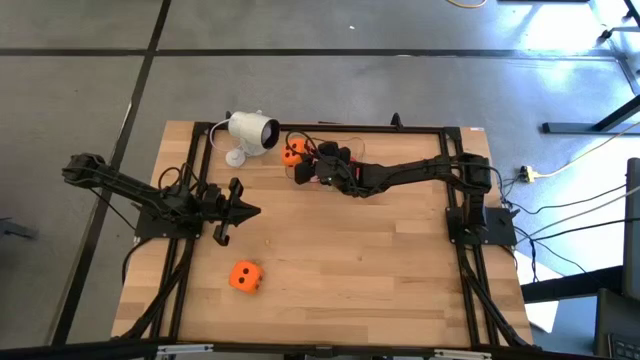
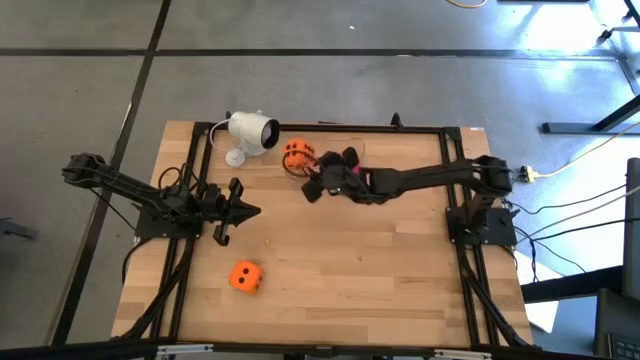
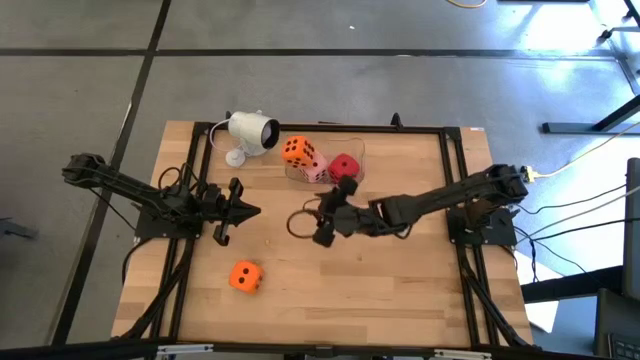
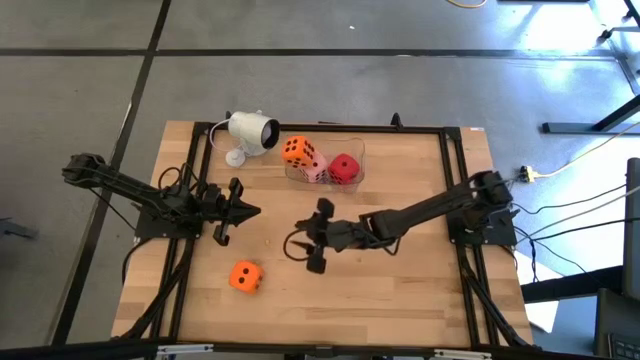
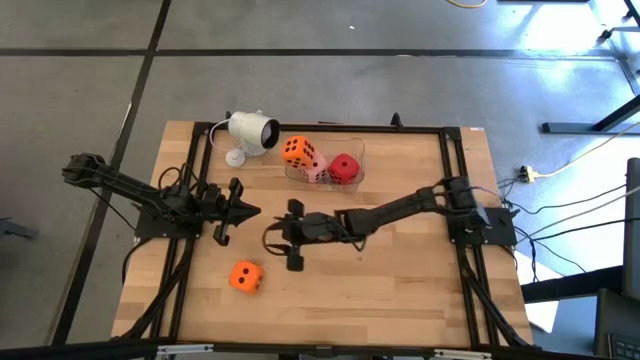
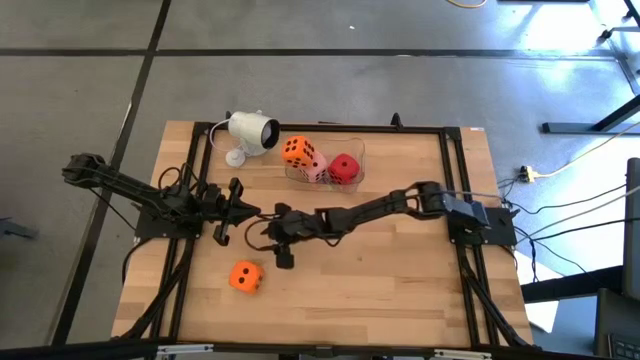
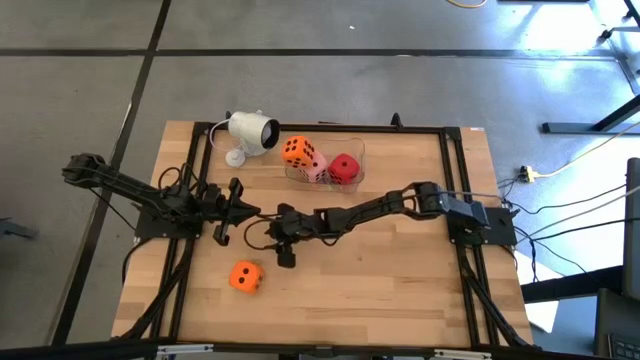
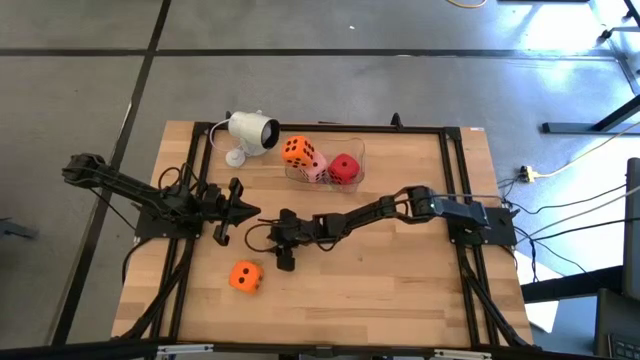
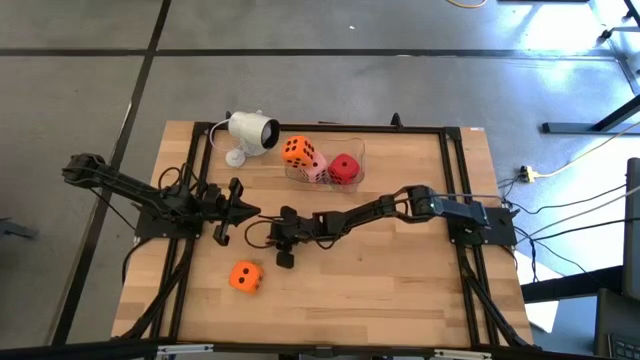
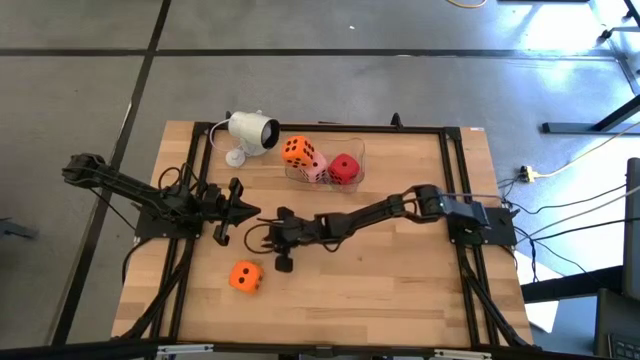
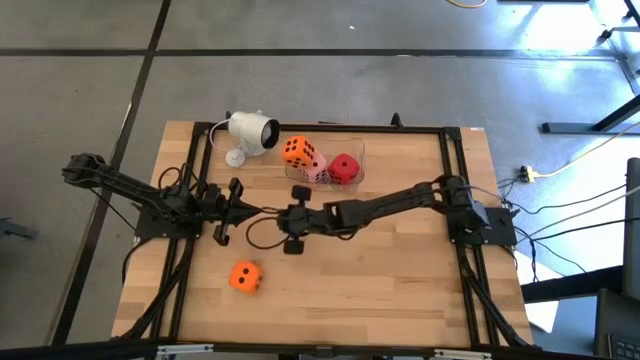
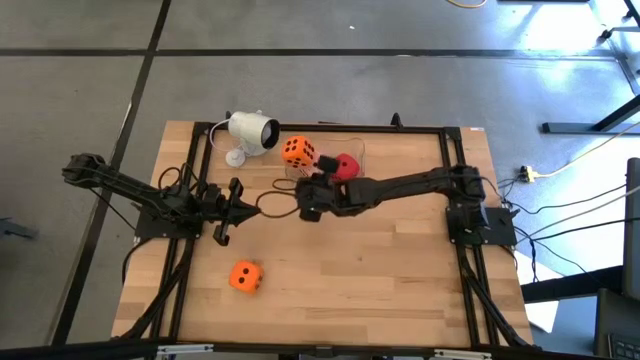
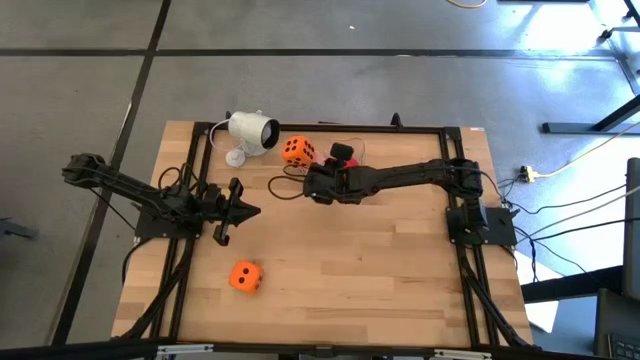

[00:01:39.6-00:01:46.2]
Task: Pick & Place Dice
Put the small yellow die into the transparent bin

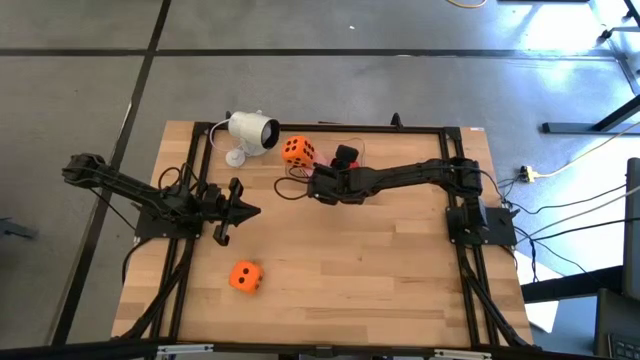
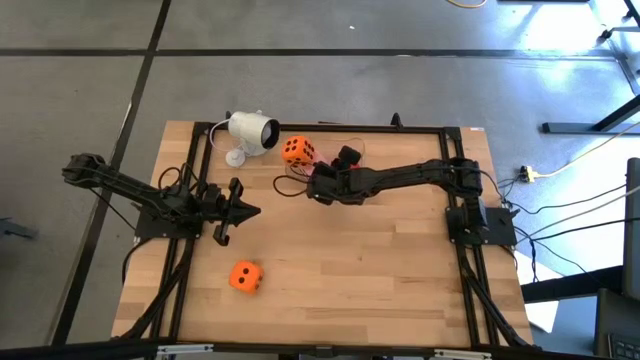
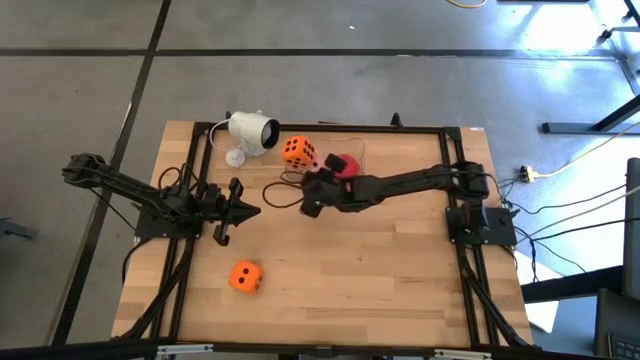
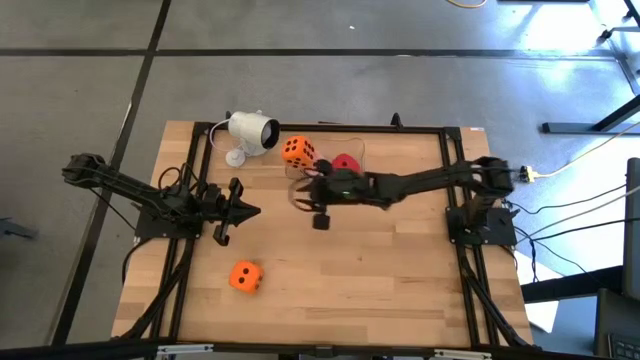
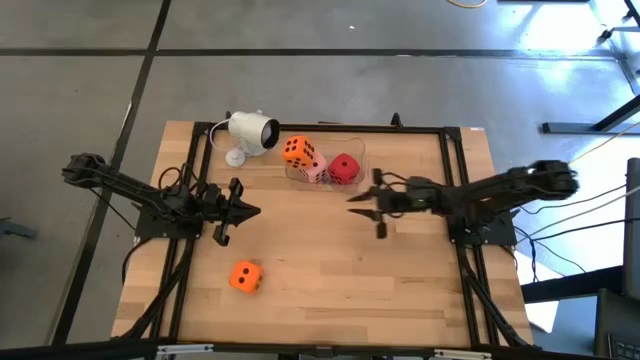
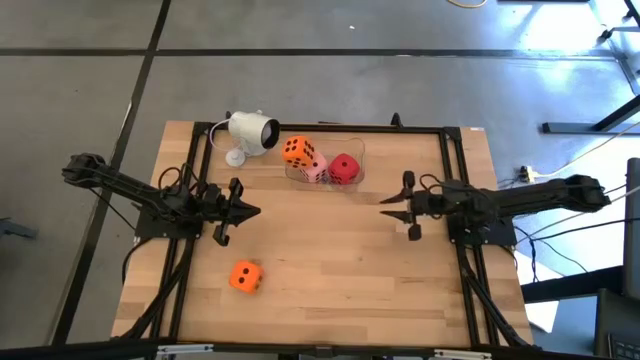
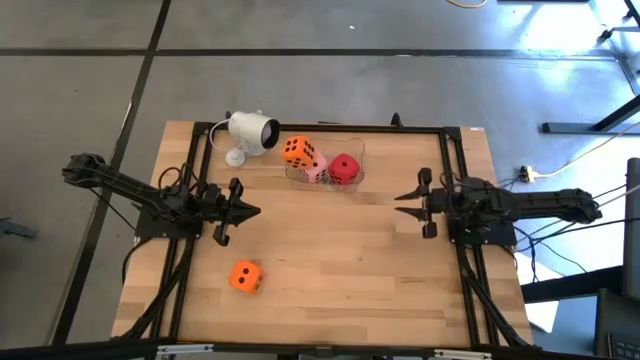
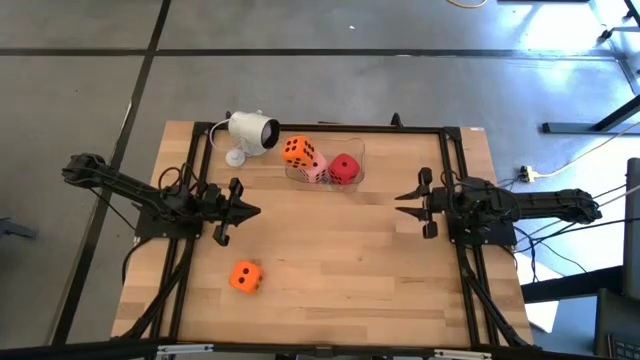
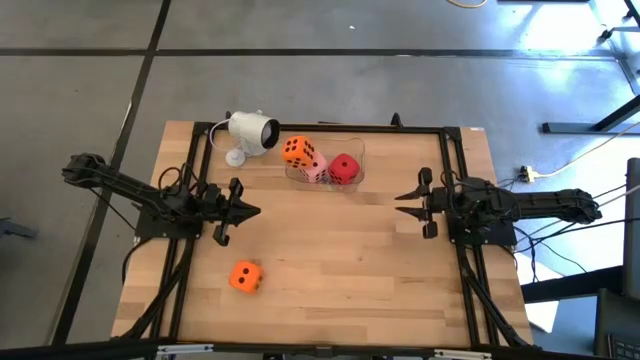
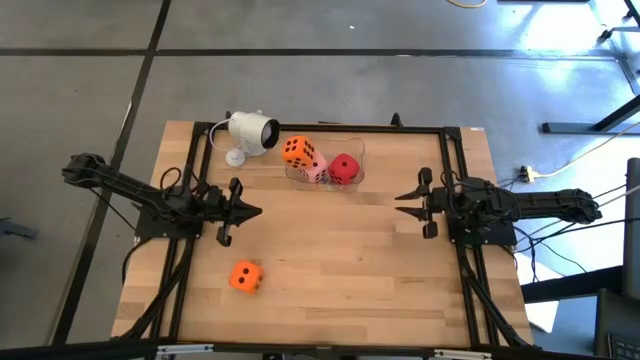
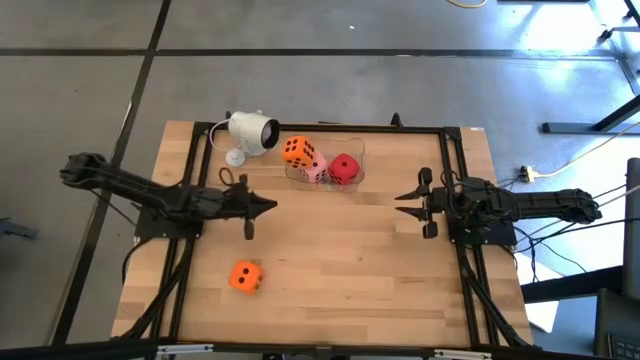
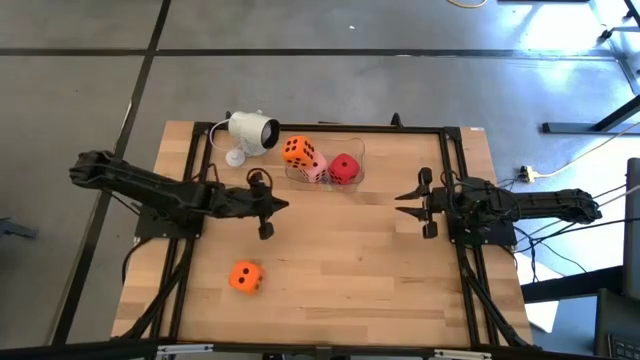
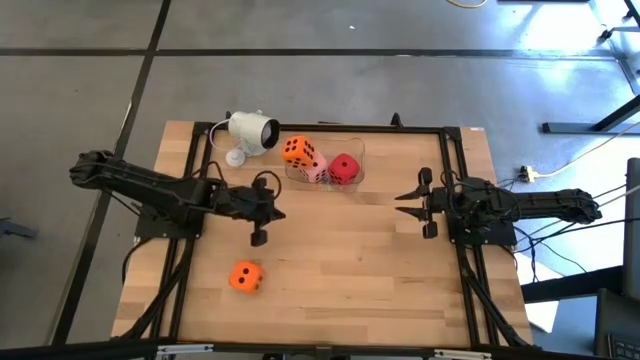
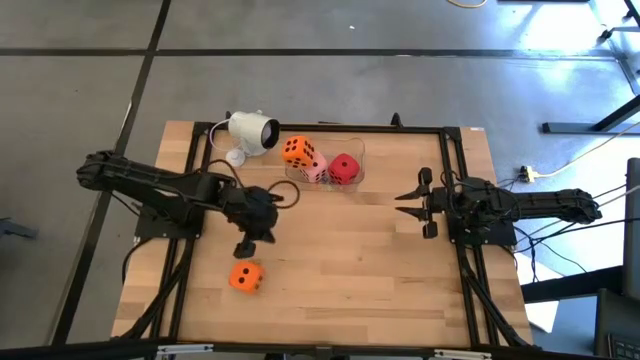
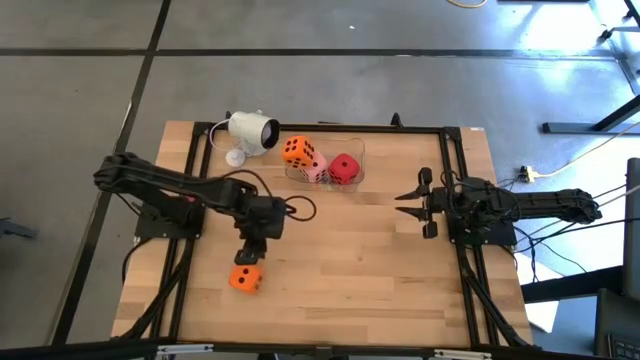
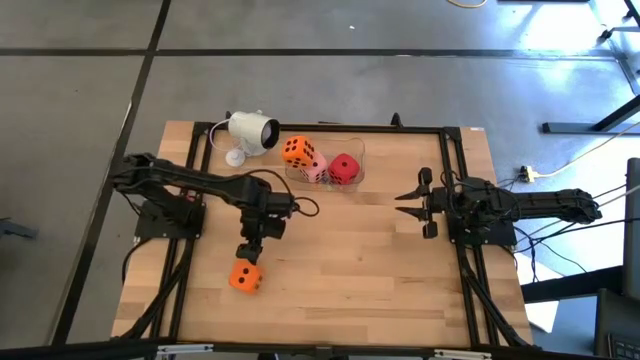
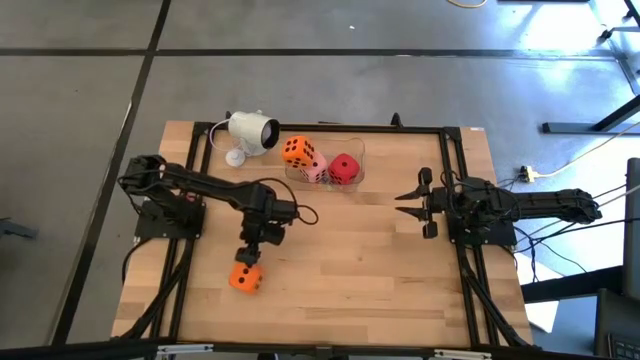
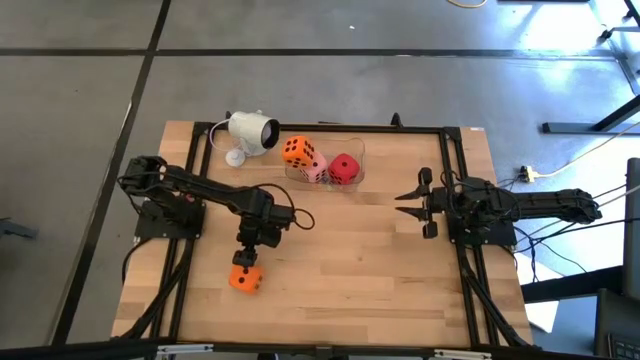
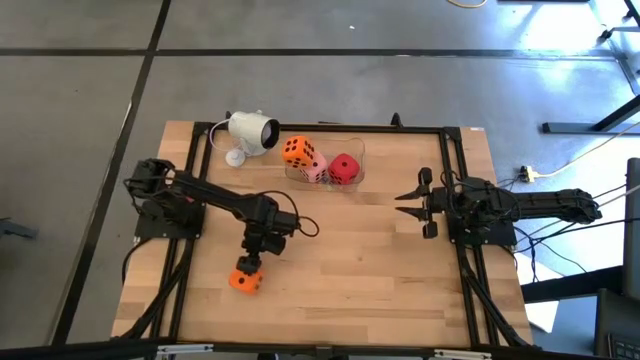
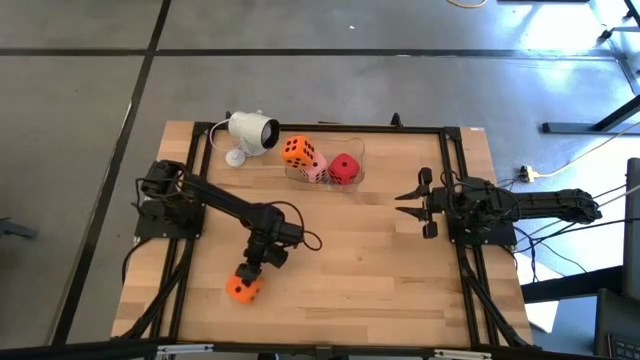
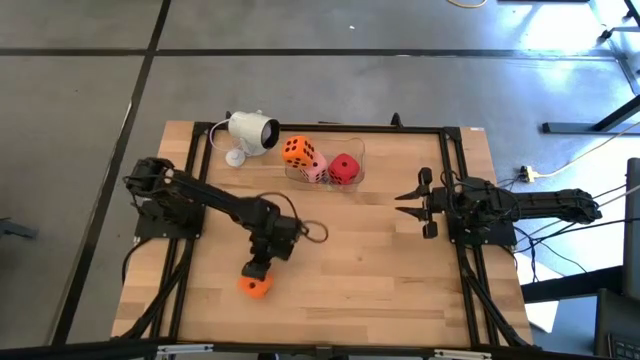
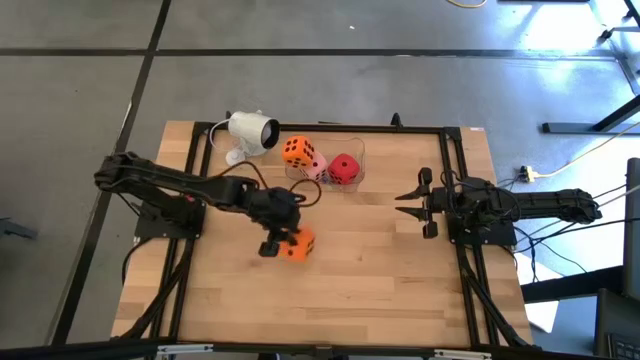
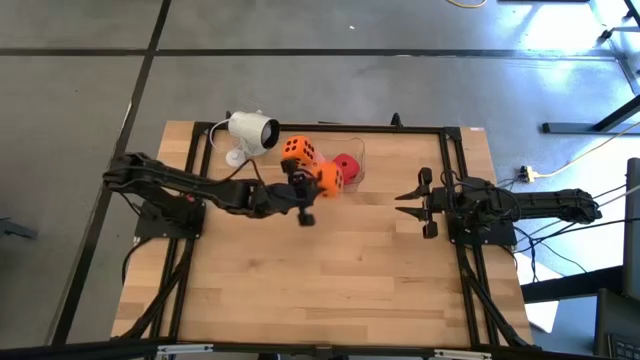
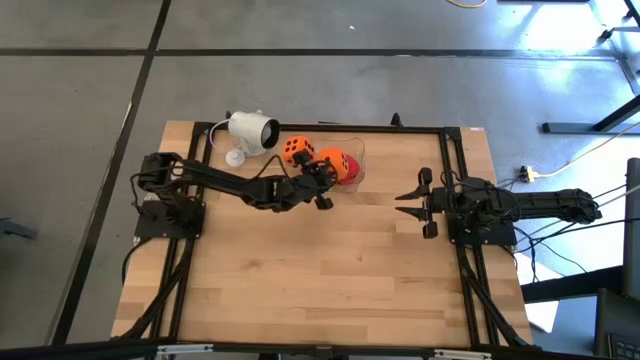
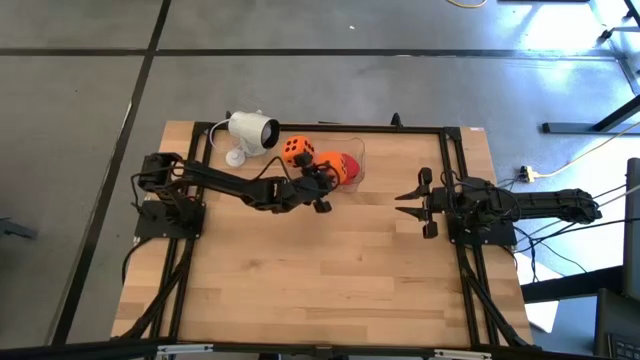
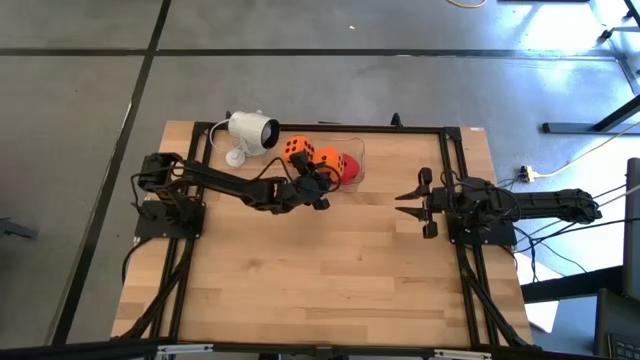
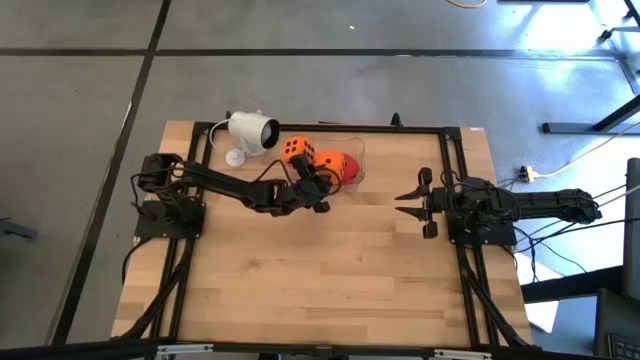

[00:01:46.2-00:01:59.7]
Put the large orange die into the transparent bin

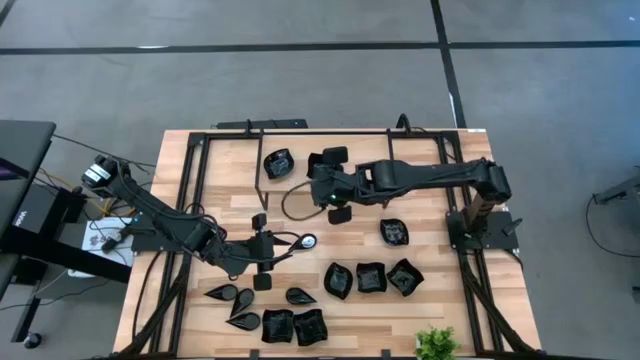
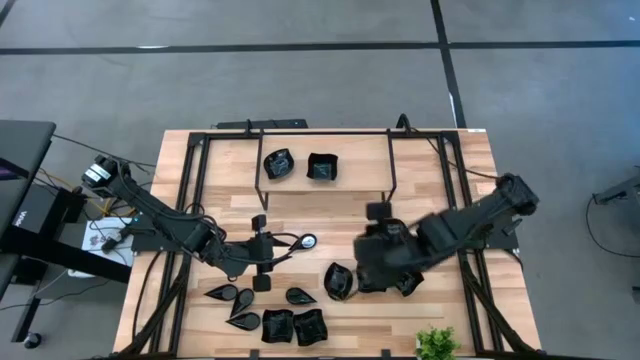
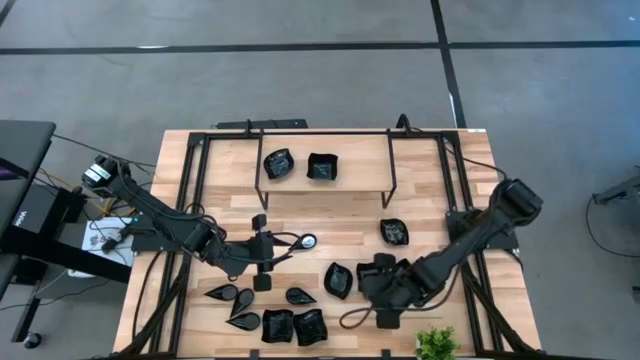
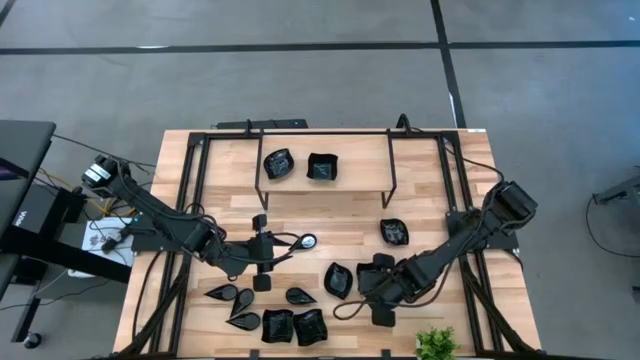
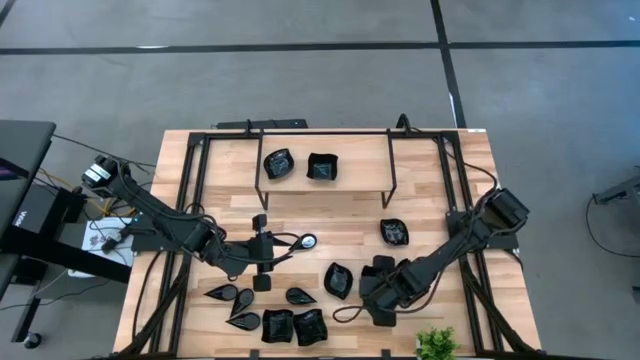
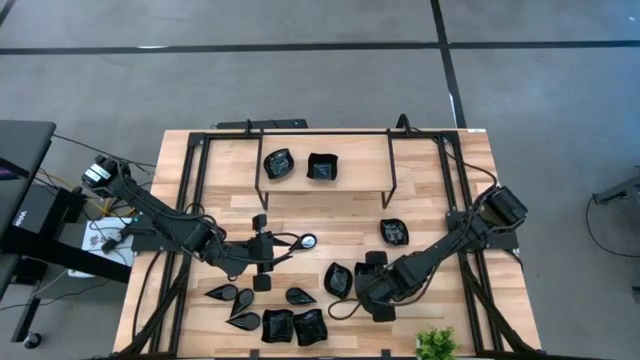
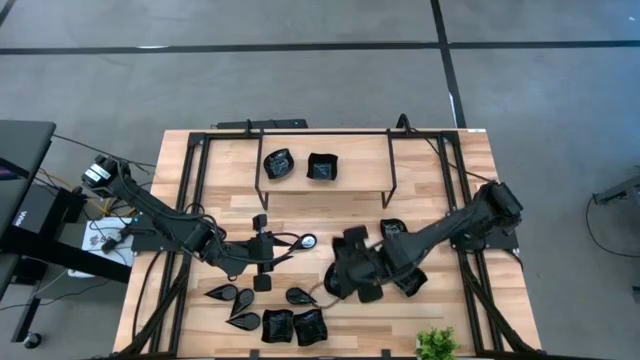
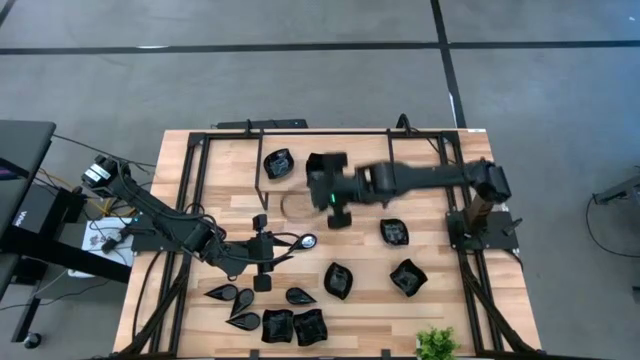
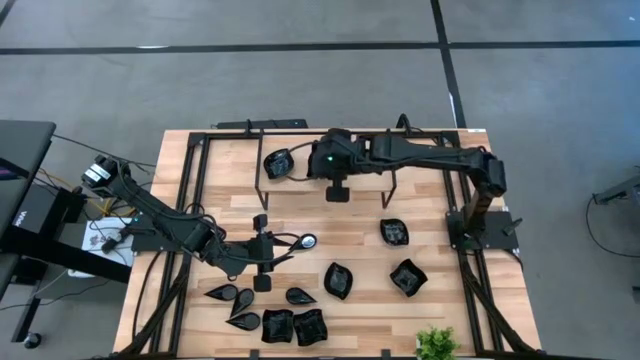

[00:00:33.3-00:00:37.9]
Task: Pick & Place Mini shaped plates
Stack the black distorted square plate on top of the black distorted square plate on the shelf
